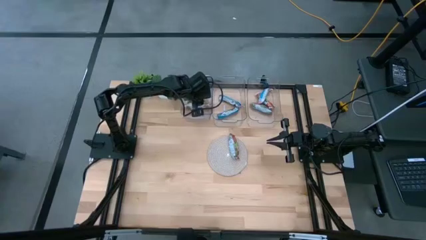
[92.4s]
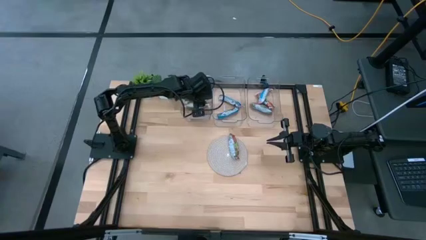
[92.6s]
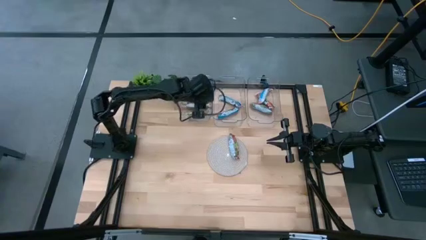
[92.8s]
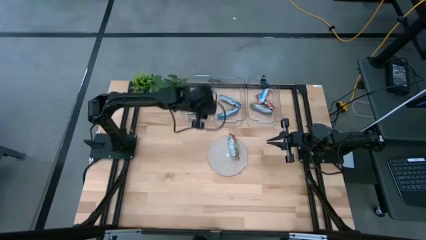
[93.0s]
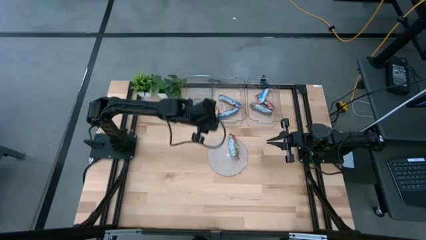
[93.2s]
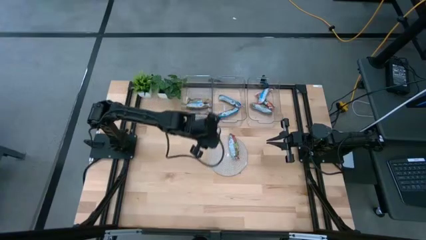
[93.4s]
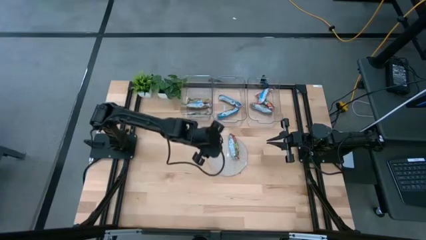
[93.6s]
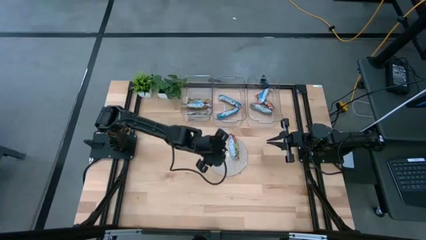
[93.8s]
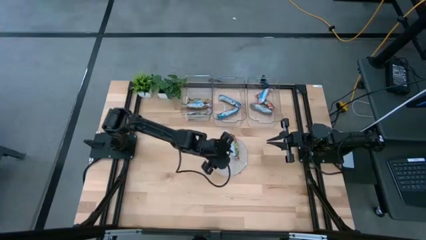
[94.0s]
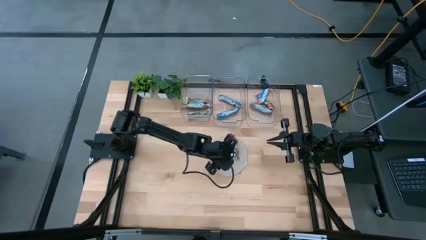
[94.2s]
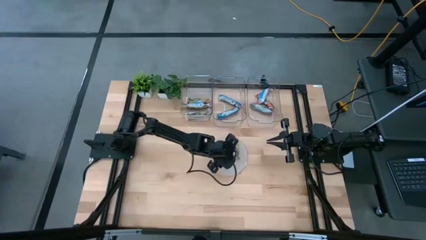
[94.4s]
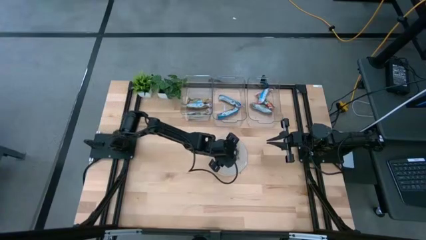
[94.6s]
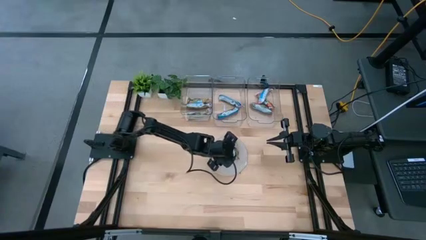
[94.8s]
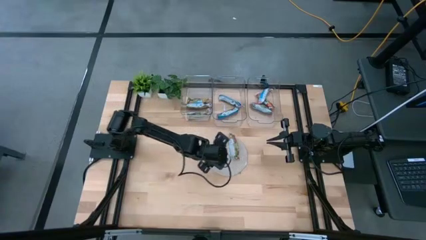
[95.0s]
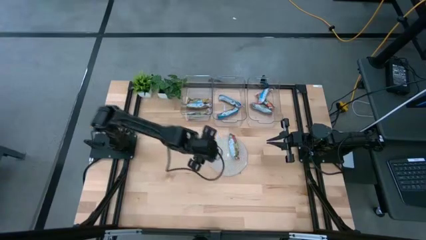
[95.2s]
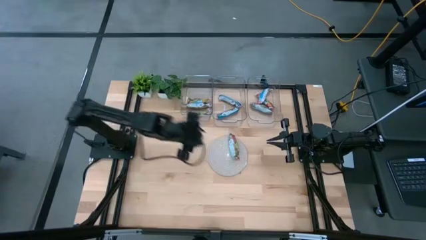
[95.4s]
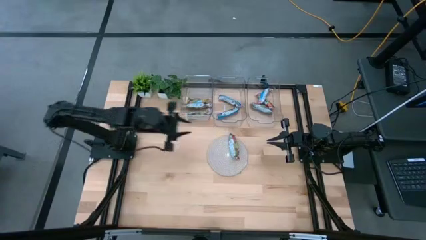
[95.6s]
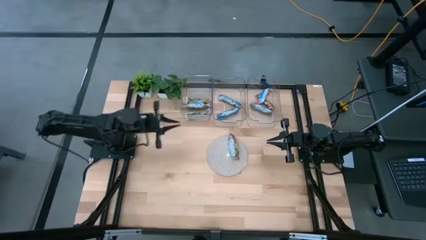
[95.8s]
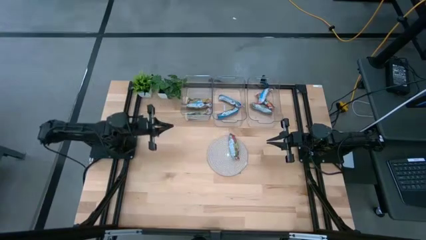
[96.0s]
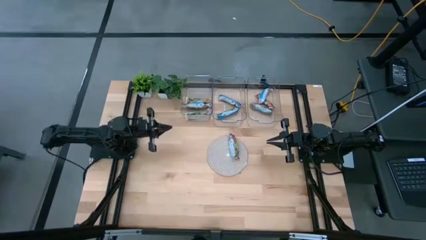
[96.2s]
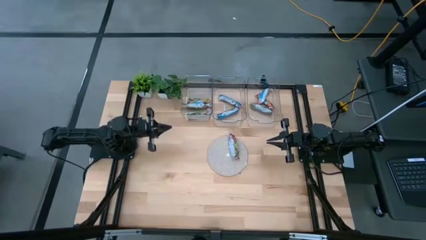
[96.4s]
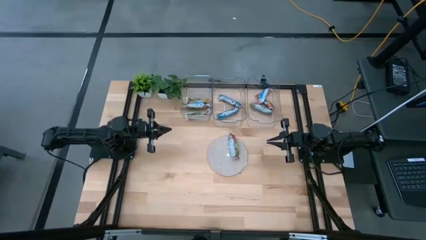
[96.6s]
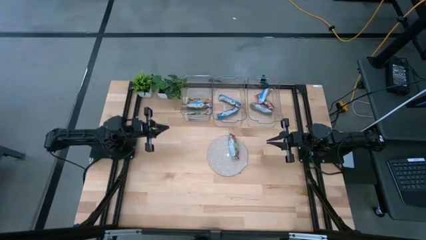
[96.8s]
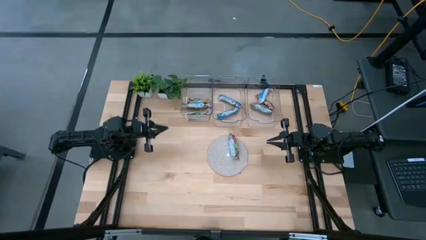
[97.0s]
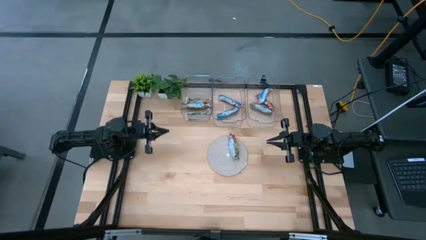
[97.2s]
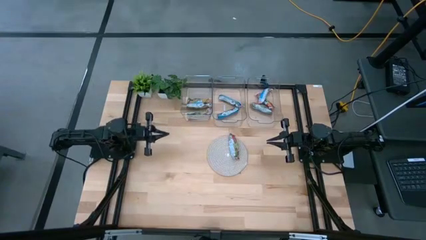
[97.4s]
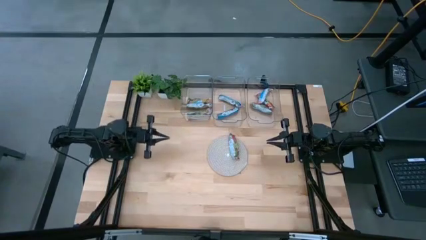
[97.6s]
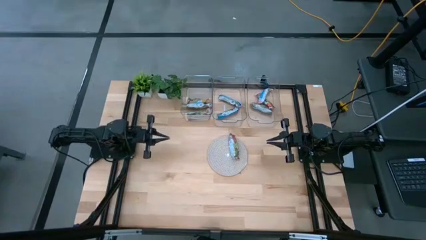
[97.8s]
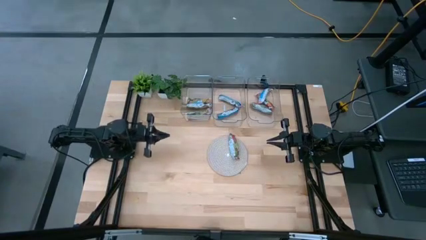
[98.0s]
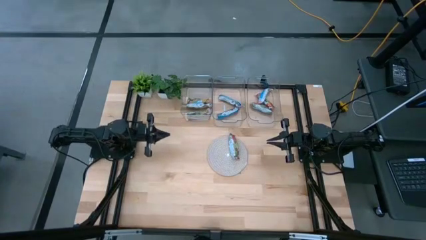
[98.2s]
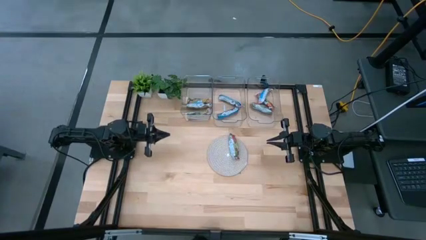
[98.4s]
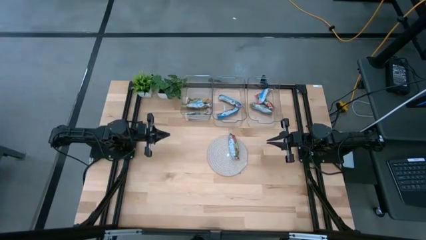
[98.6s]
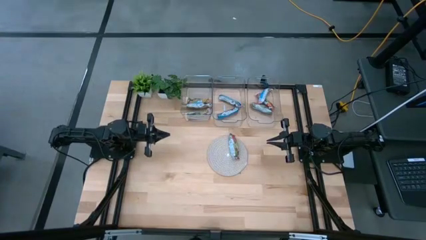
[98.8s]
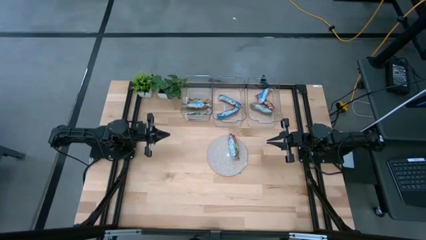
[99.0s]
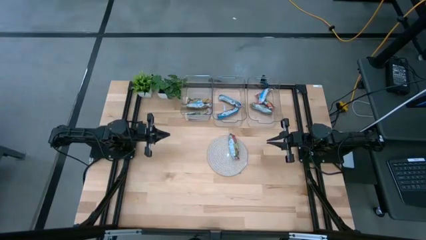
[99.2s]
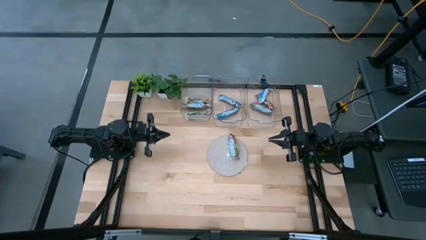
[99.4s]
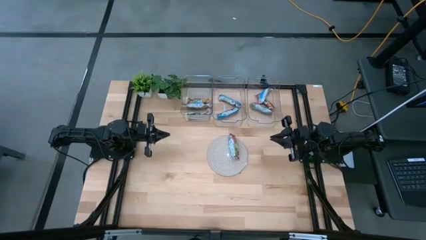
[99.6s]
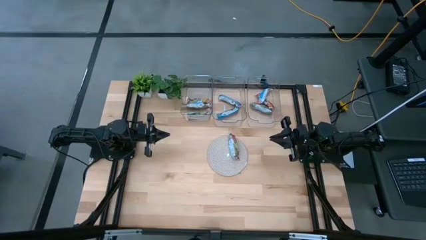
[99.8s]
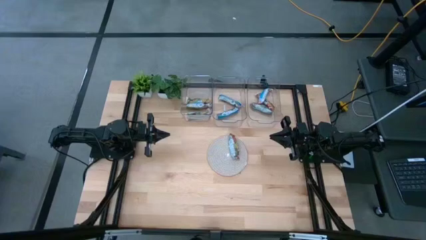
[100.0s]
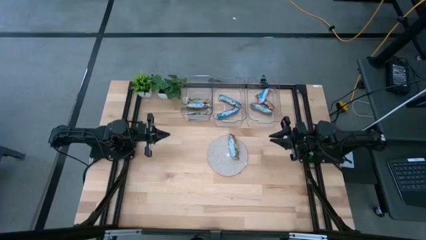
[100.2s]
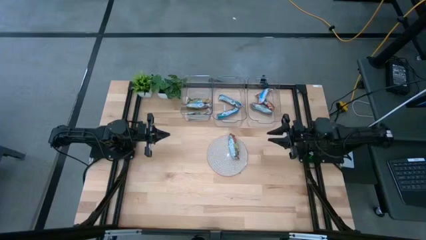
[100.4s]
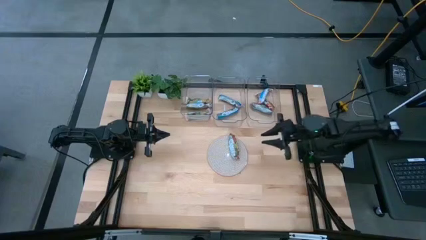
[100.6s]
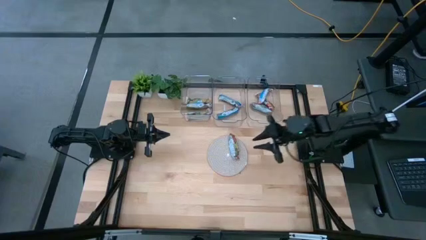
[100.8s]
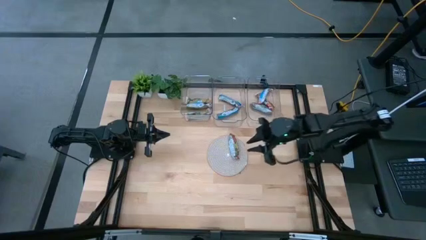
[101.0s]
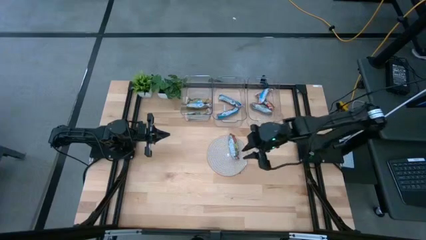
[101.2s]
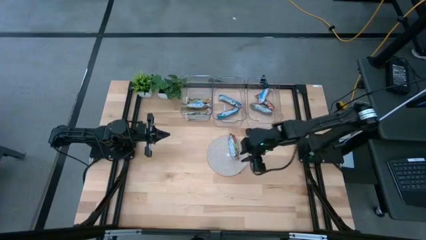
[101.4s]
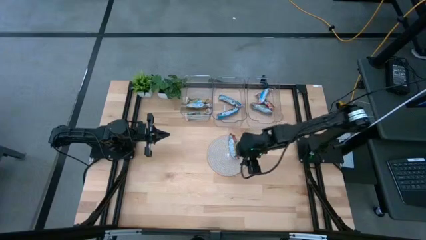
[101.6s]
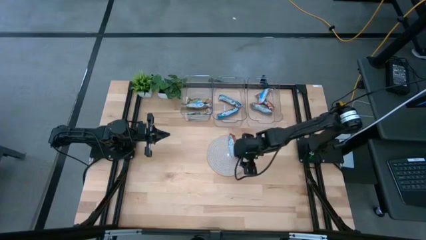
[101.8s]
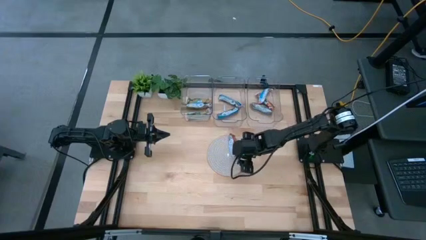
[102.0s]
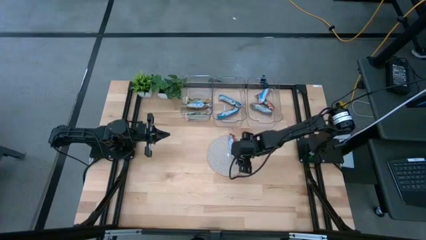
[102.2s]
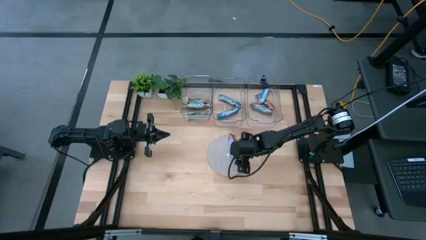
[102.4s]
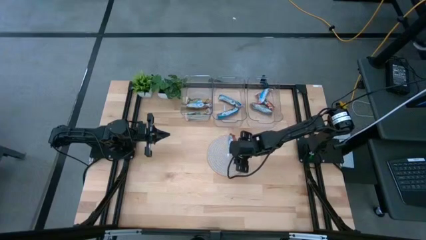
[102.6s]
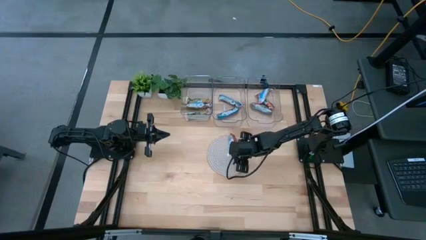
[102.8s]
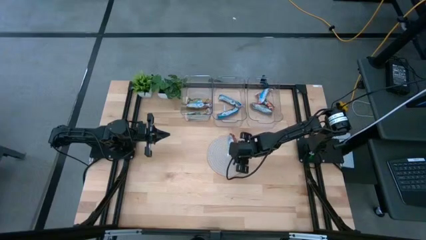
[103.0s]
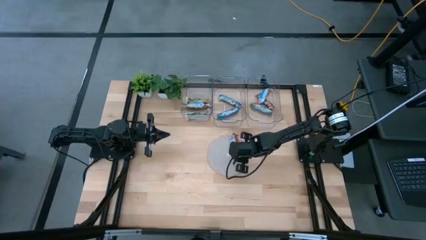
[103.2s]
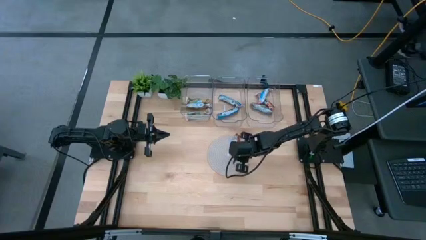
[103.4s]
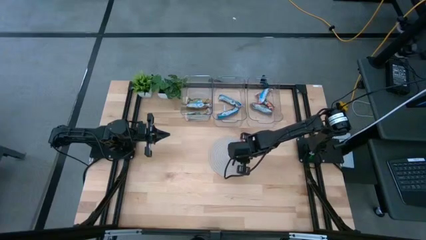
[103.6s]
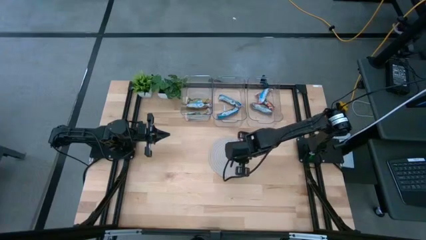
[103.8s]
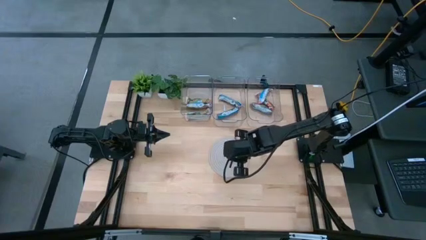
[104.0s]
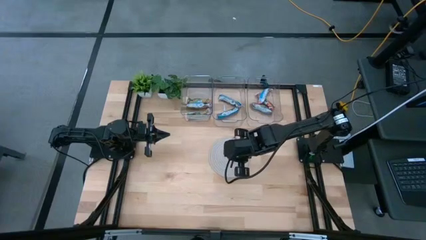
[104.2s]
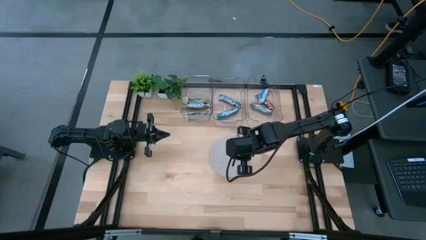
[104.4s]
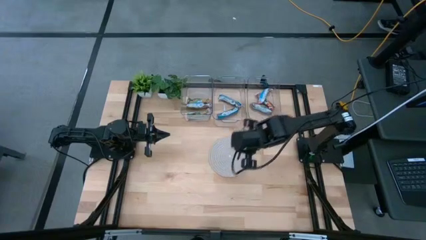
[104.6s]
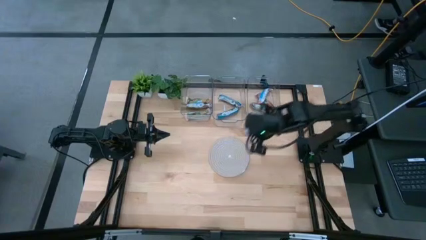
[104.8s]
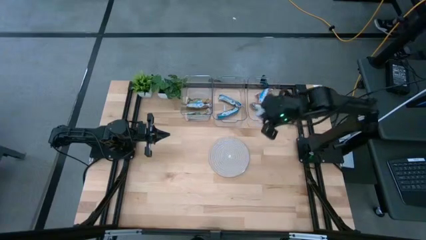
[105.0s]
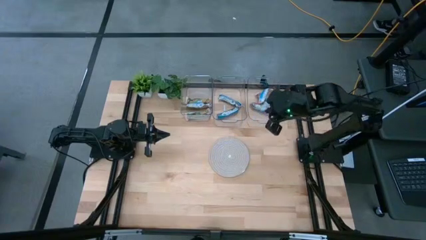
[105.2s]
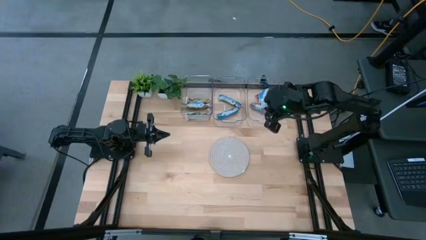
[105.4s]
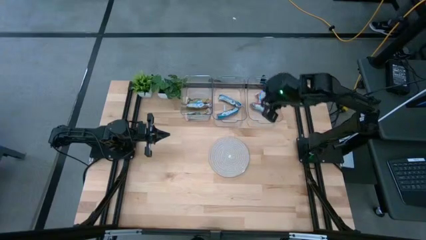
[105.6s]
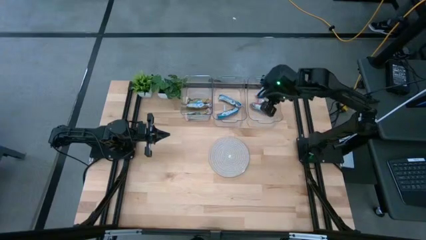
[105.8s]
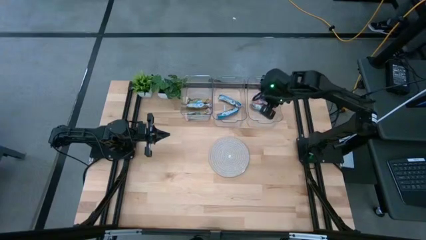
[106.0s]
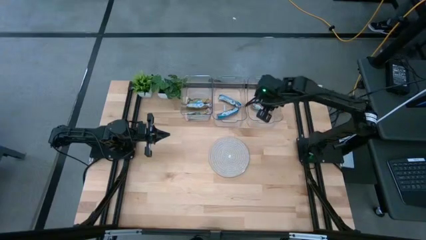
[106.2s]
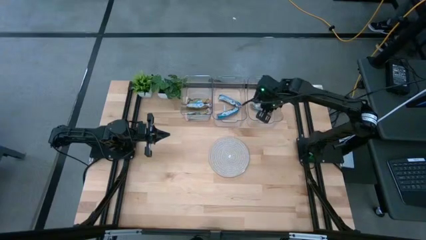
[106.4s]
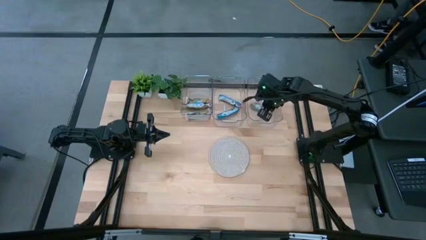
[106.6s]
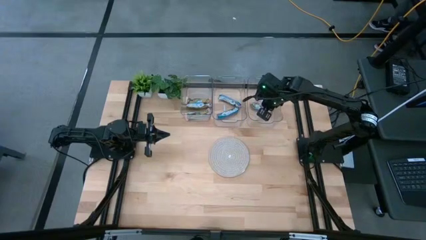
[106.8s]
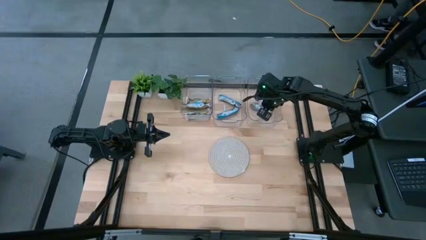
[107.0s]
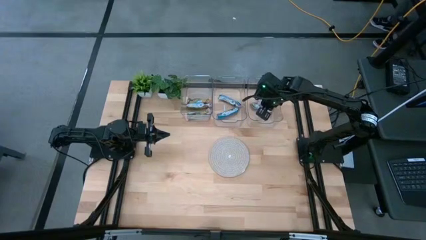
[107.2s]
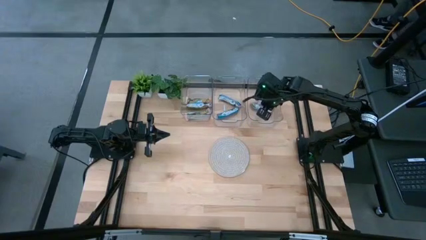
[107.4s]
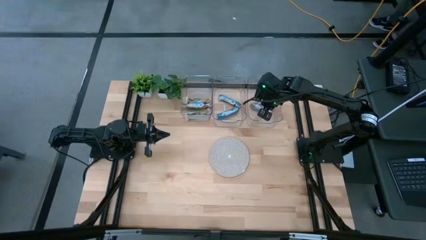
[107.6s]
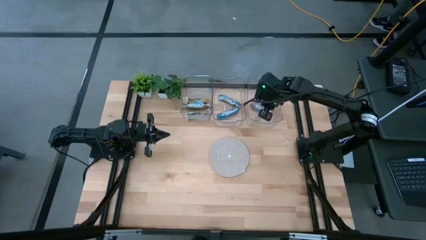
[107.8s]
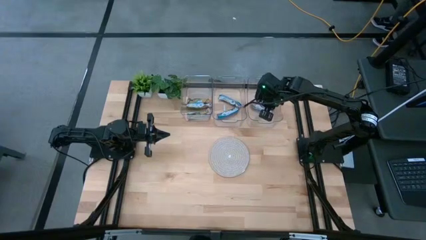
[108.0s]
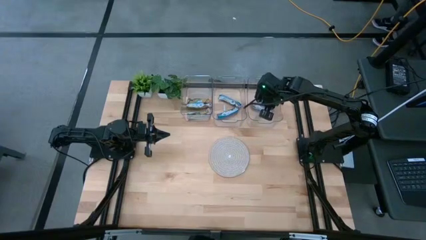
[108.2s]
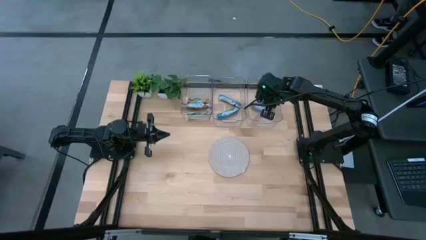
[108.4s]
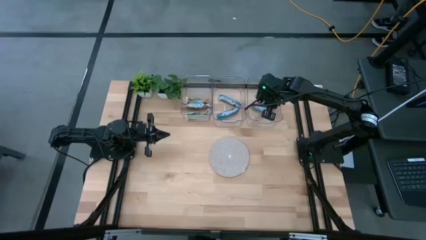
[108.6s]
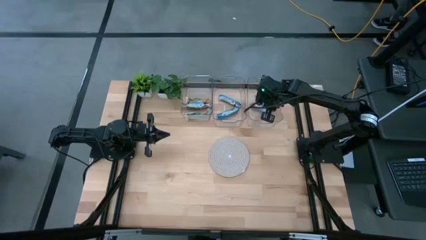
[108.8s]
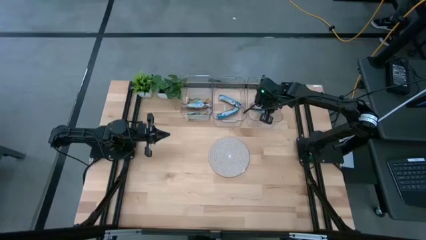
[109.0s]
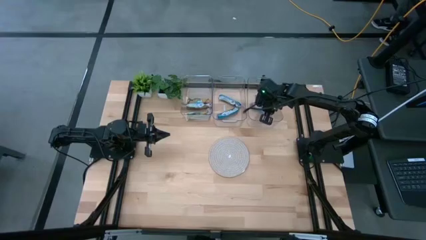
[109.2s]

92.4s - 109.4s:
Task: Pick and place Granola Bars by type
Put the red granola bar into the right transparent bin
